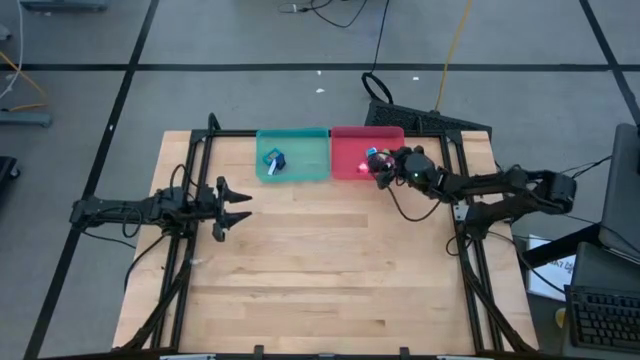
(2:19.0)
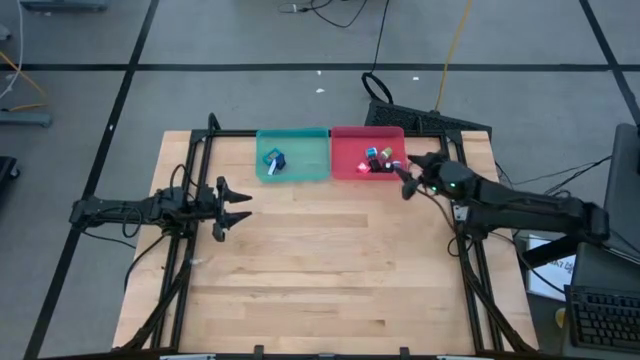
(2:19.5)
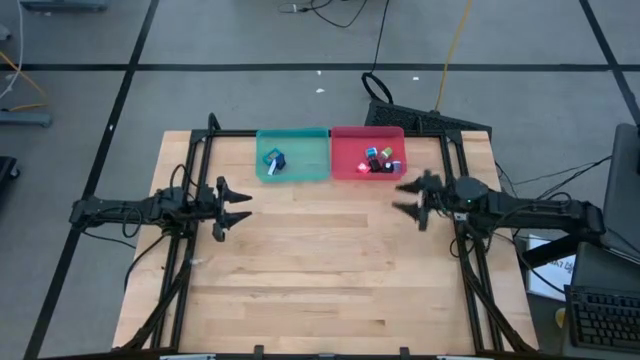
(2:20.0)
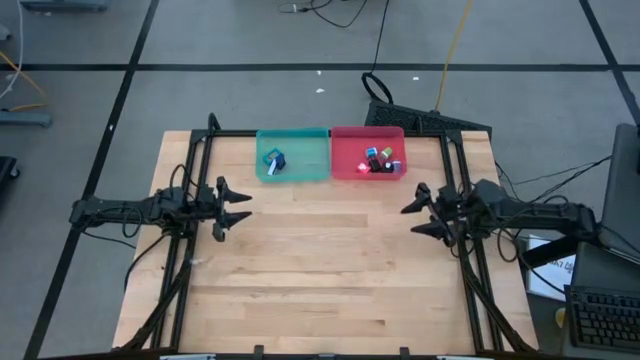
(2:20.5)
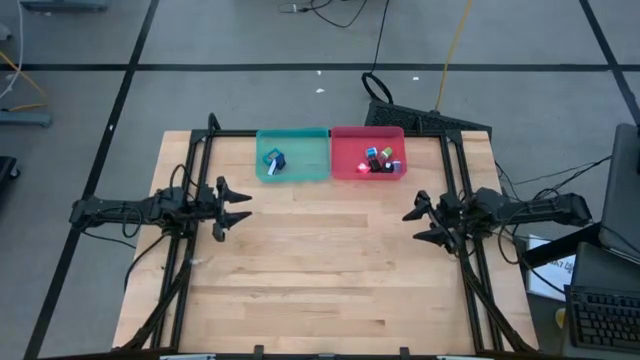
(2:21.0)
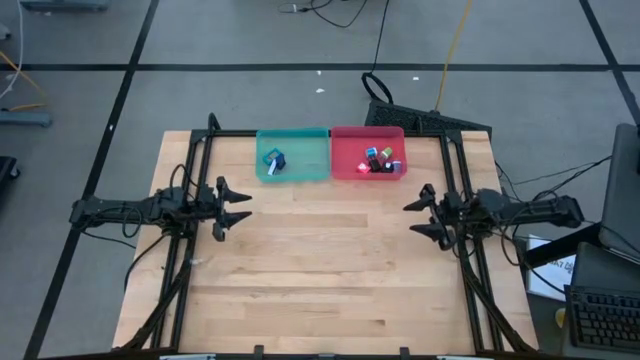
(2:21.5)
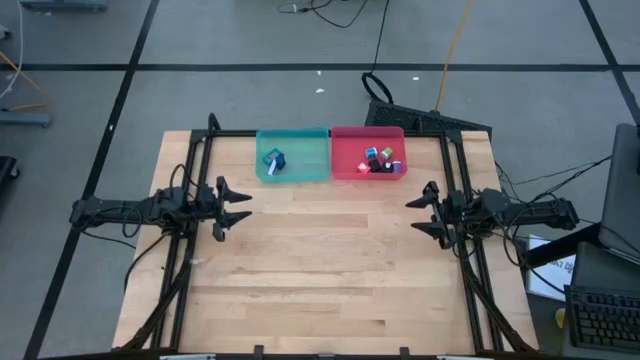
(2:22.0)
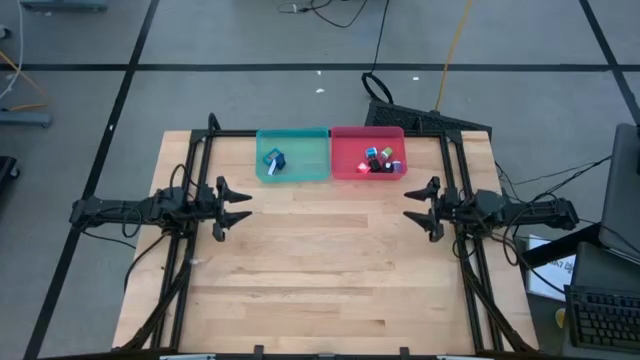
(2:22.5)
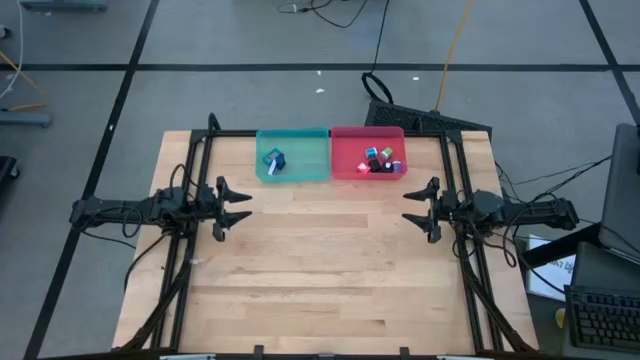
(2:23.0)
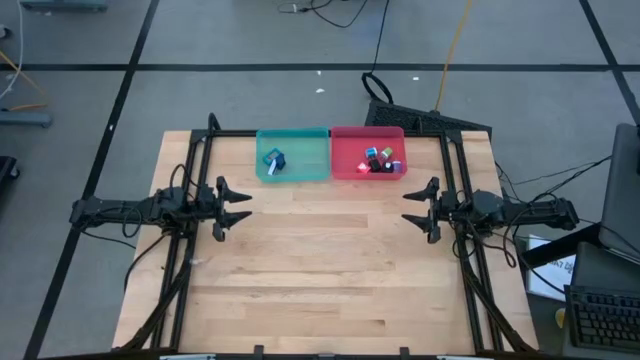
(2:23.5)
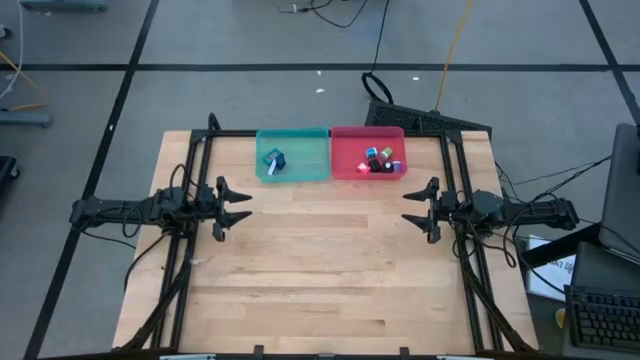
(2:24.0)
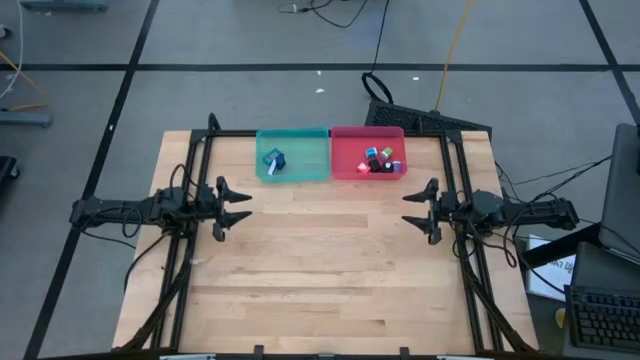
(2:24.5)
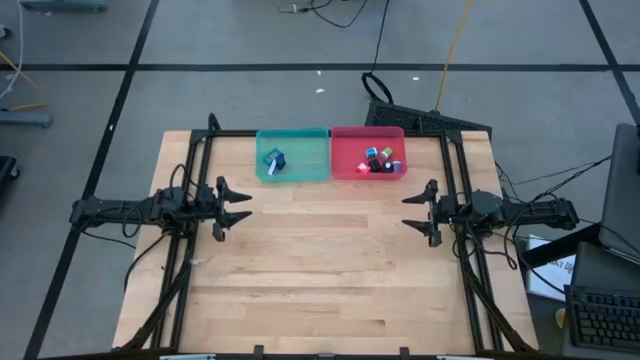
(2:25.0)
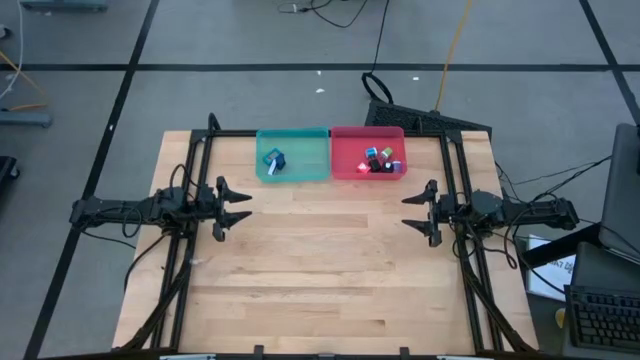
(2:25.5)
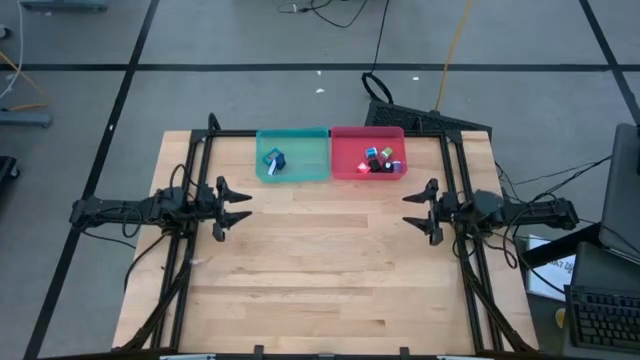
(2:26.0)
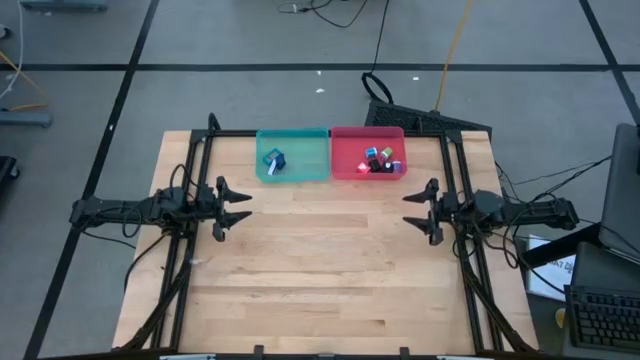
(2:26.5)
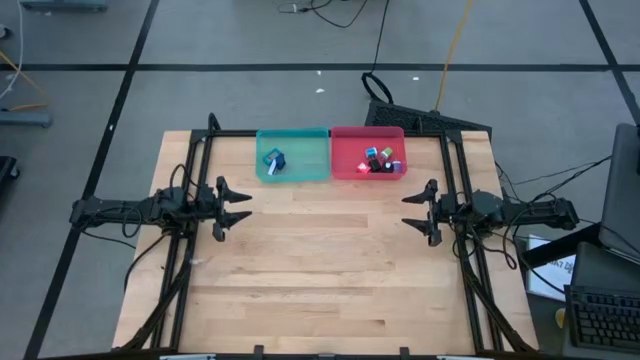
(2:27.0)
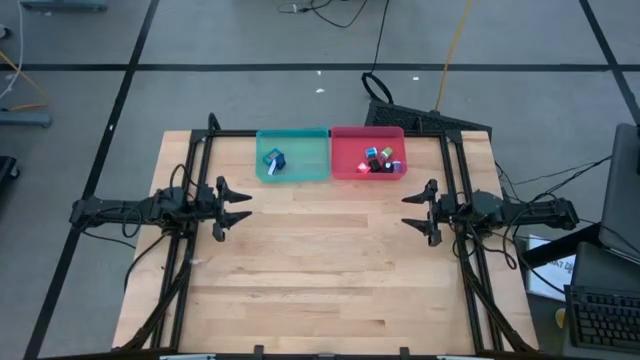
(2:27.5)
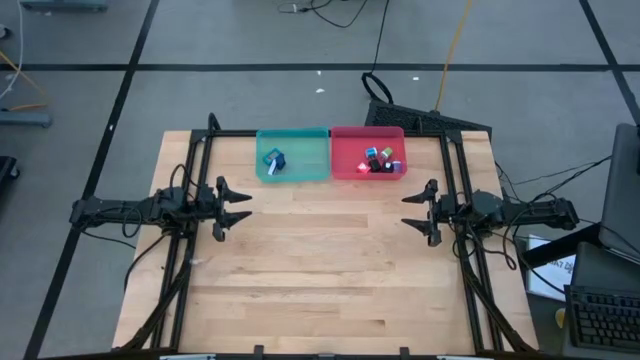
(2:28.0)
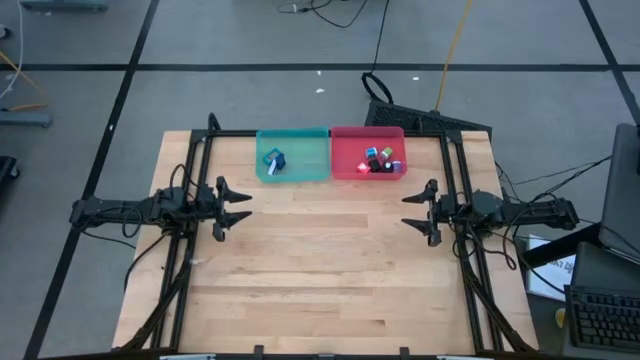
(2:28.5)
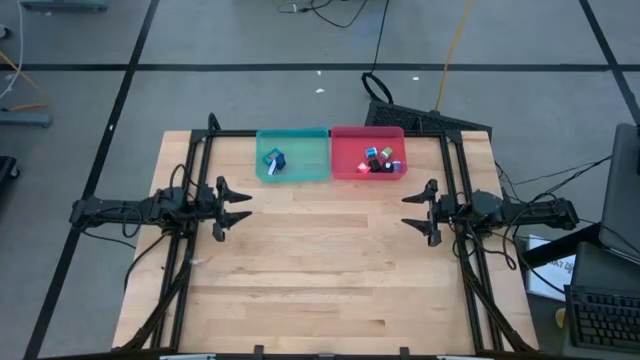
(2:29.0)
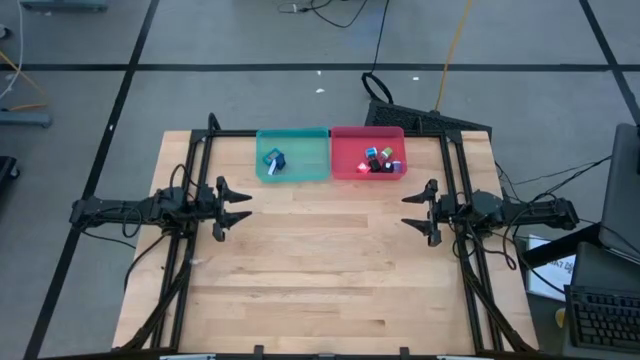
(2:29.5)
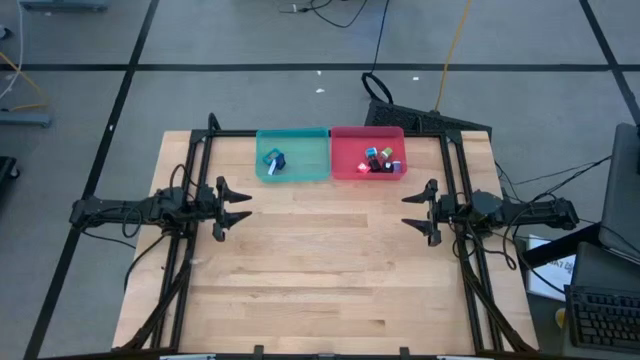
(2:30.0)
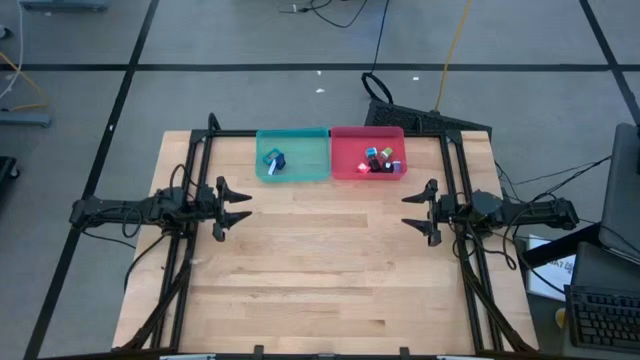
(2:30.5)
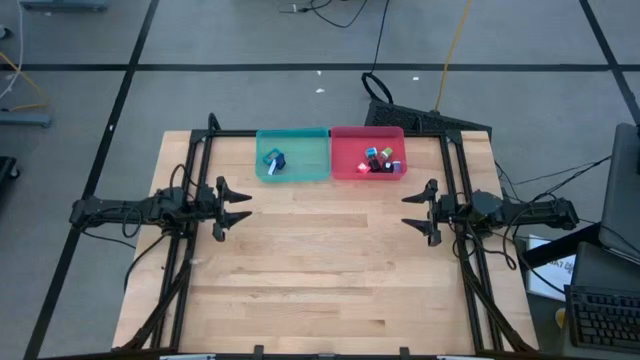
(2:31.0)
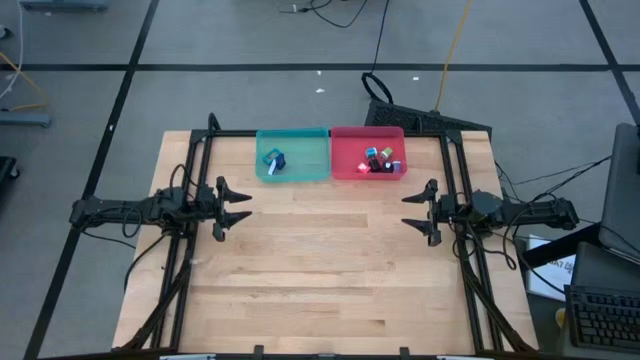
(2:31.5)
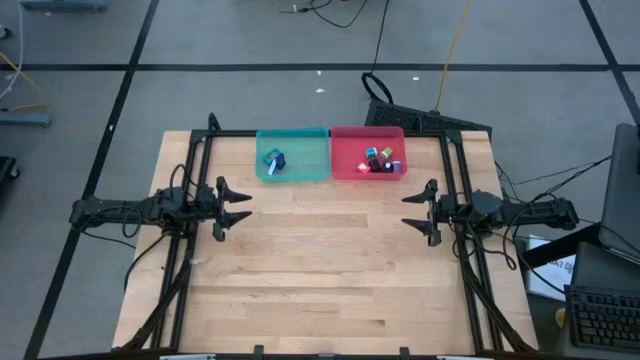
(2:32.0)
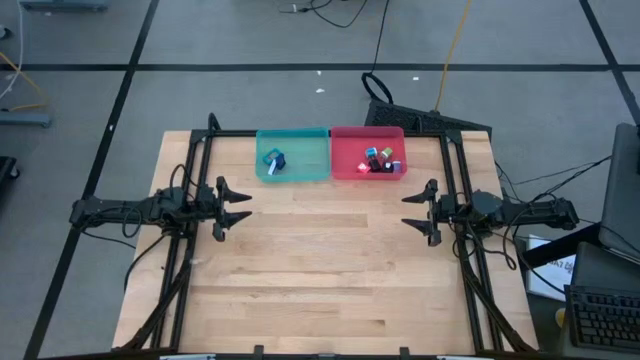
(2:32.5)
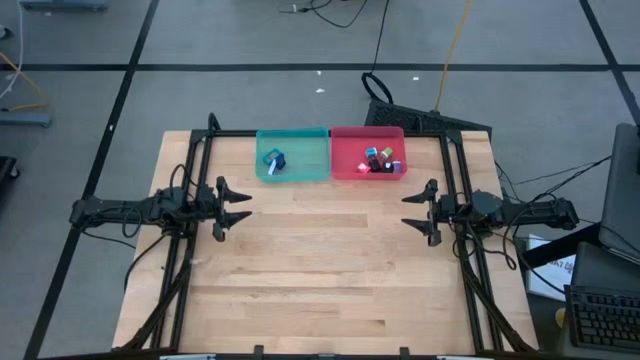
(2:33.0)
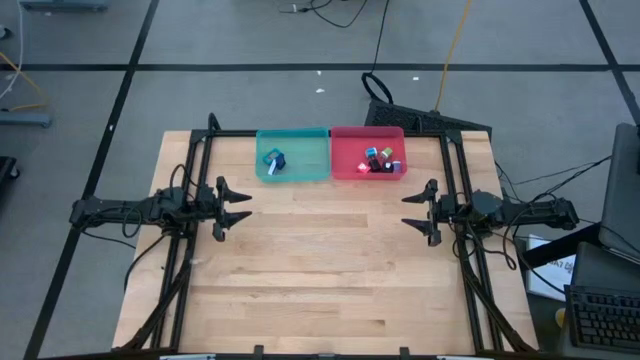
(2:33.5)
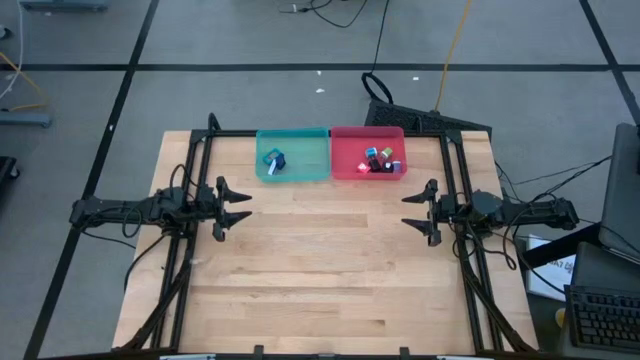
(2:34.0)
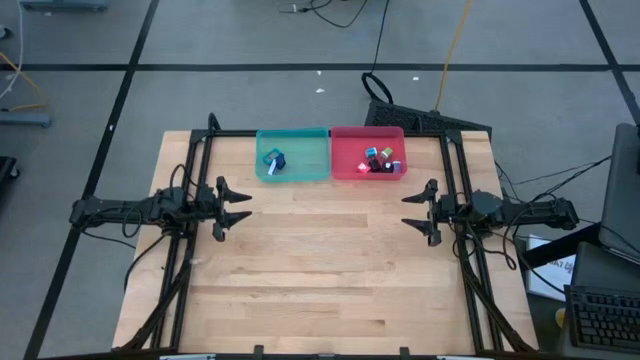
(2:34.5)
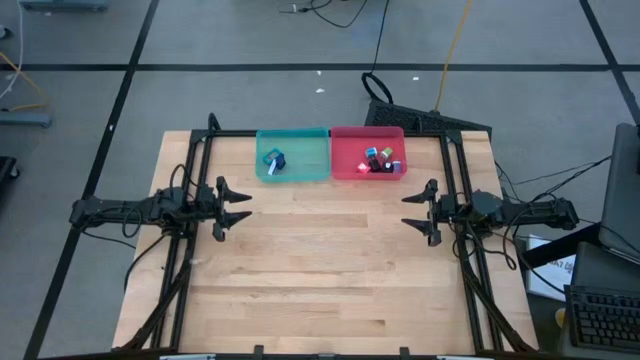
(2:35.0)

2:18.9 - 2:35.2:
Task: Sort charging adapters and watches
Return to Home Position

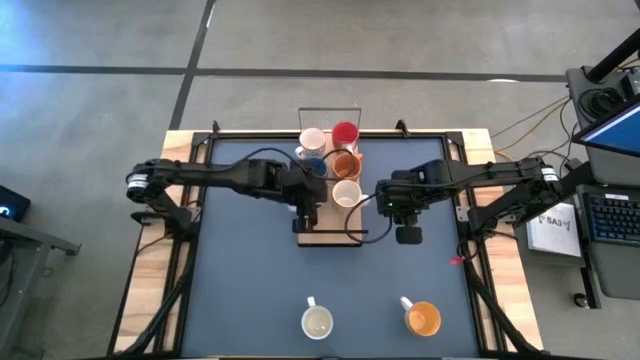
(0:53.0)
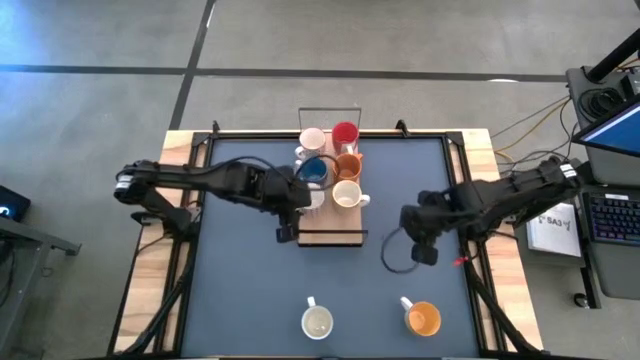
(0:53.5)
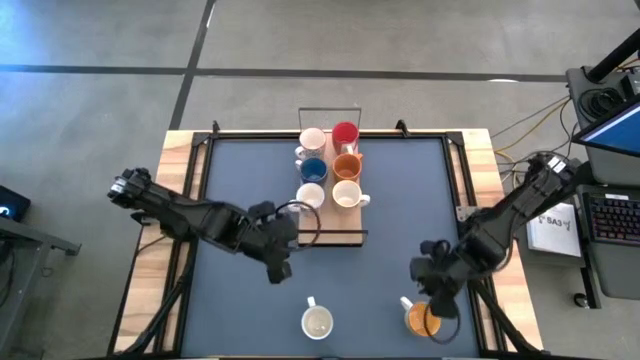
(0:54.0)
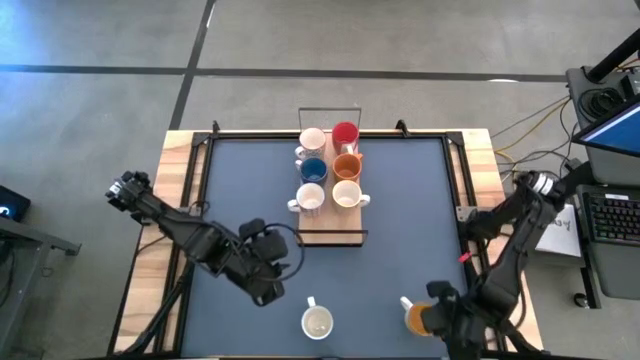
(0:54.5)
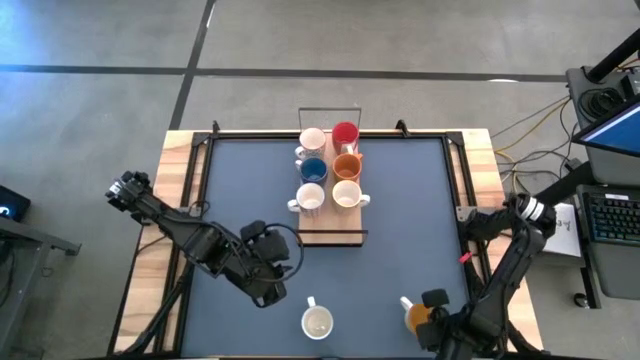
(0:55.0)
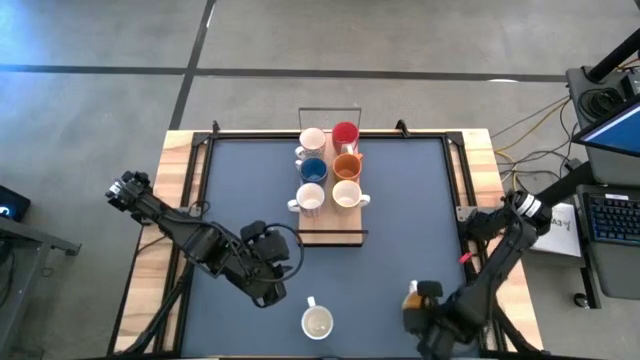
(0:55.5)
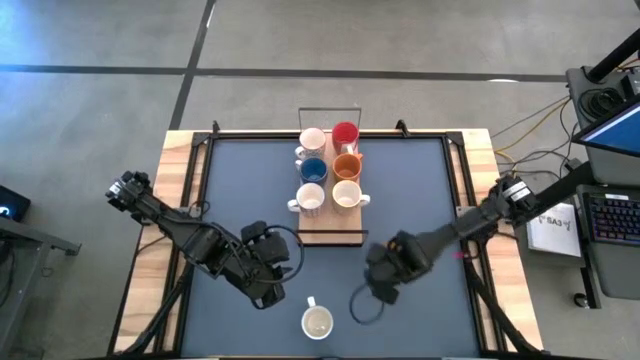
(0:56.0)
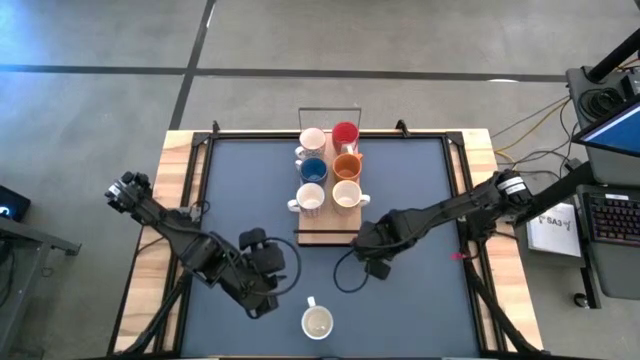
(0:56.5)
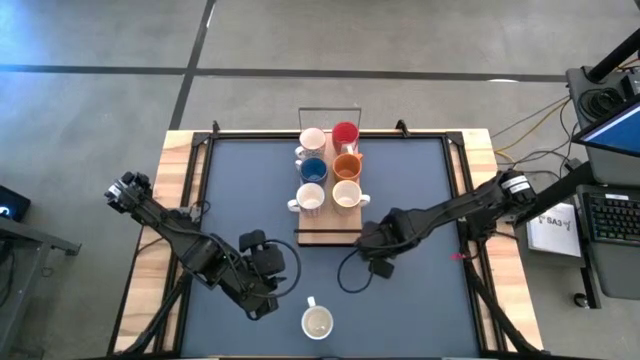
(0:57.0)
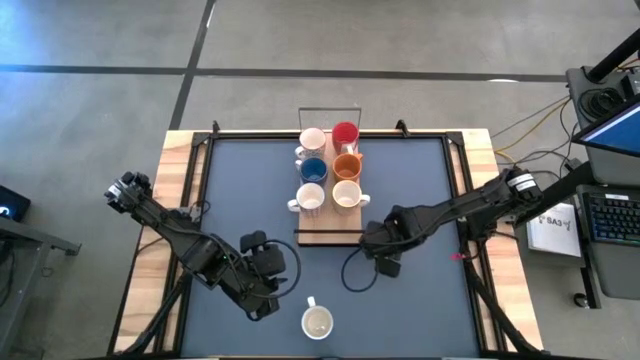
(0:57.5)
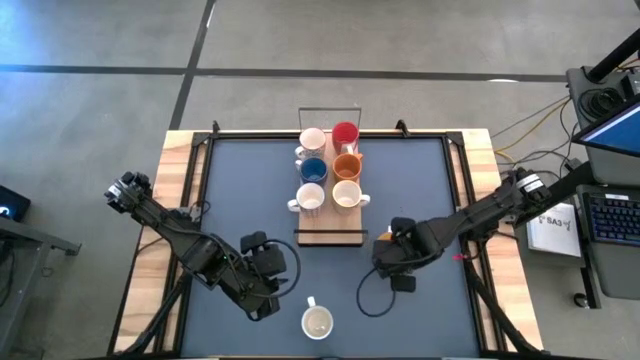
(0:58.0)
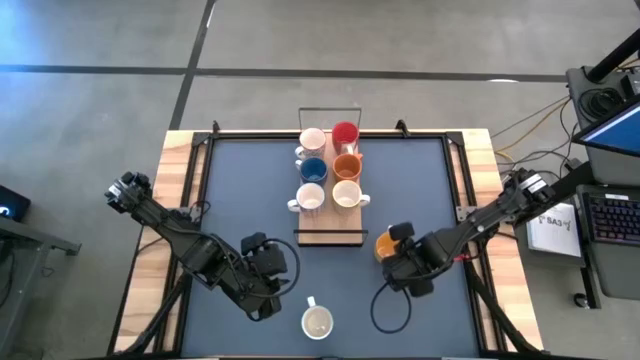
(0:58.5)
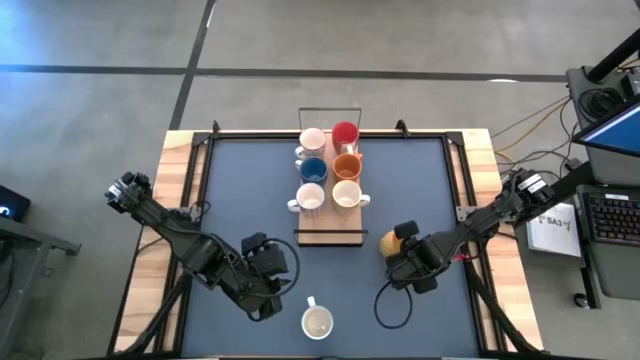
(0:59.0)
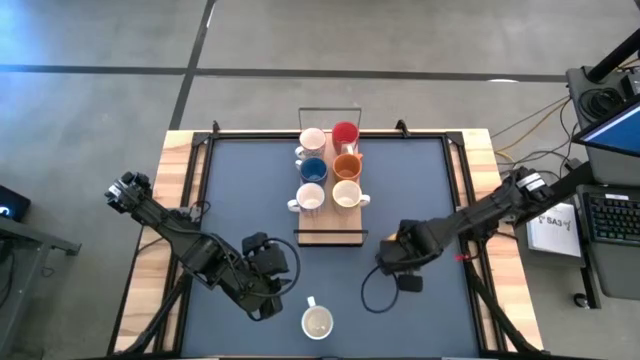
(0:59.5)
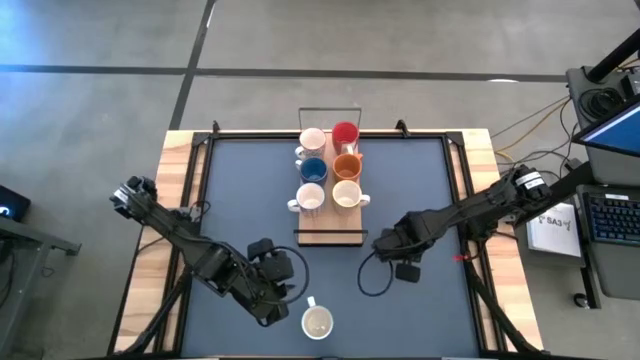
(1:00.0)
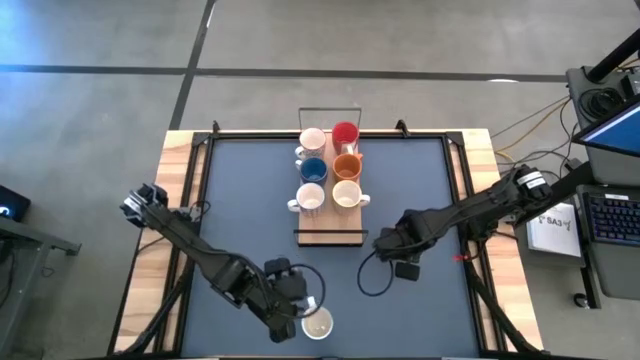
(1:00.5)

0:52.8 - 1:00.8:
Task: Place coffee mugs
Move the yellow mug to the middle right of the table
